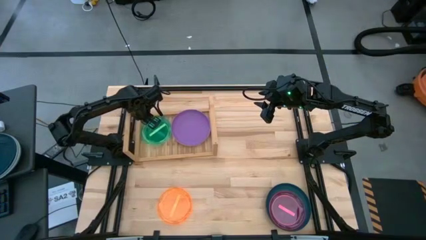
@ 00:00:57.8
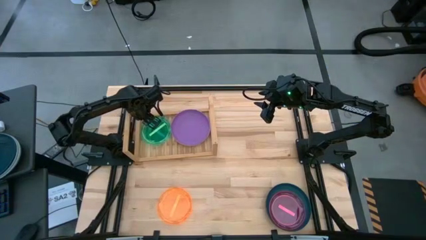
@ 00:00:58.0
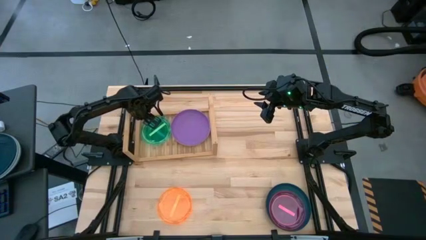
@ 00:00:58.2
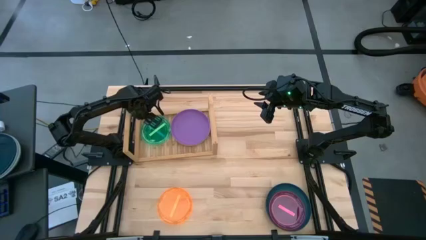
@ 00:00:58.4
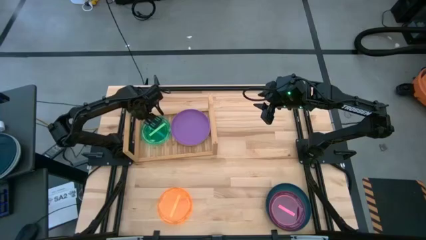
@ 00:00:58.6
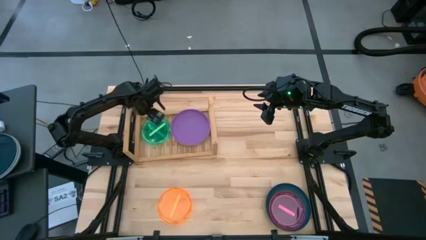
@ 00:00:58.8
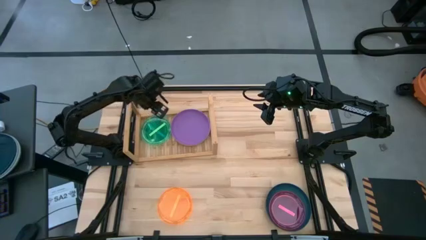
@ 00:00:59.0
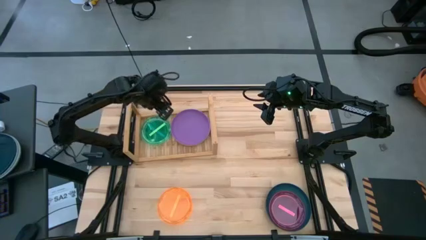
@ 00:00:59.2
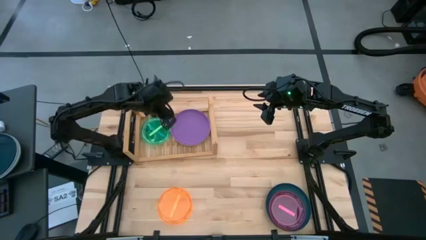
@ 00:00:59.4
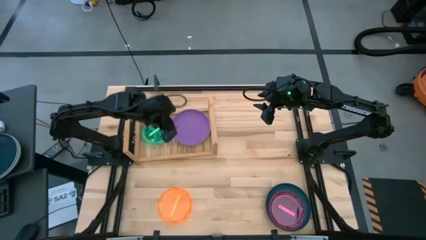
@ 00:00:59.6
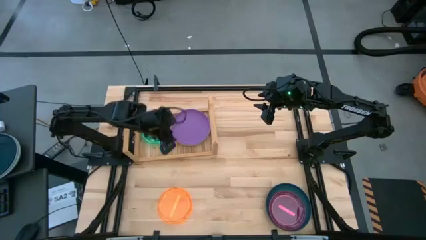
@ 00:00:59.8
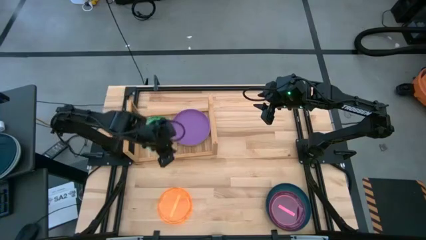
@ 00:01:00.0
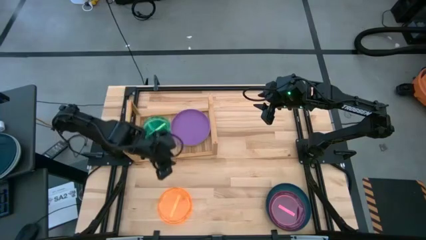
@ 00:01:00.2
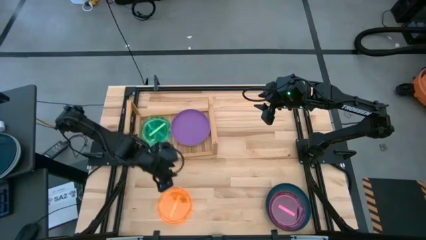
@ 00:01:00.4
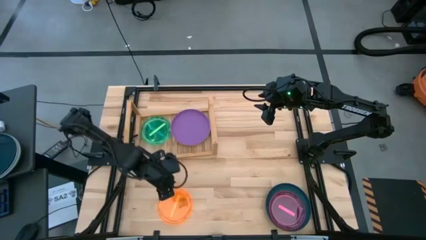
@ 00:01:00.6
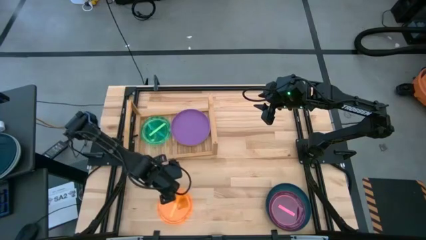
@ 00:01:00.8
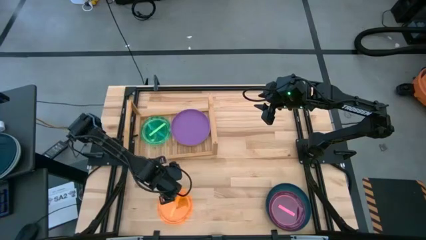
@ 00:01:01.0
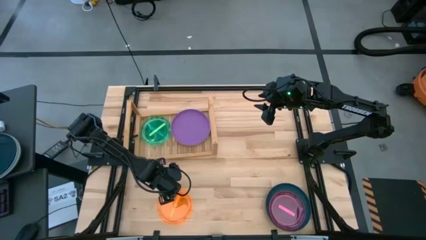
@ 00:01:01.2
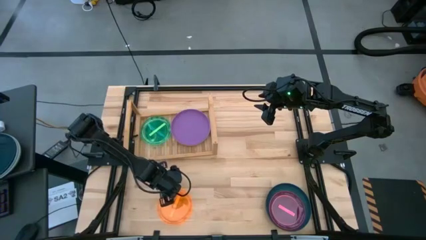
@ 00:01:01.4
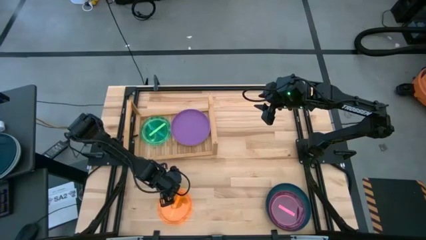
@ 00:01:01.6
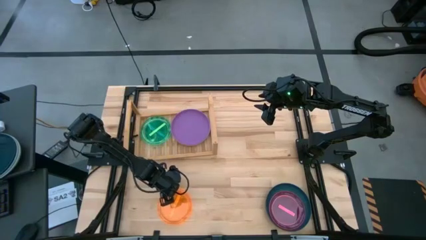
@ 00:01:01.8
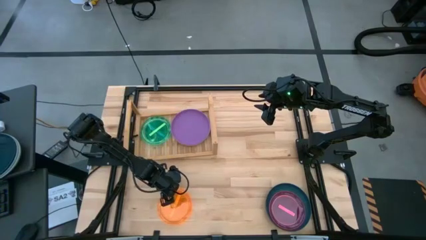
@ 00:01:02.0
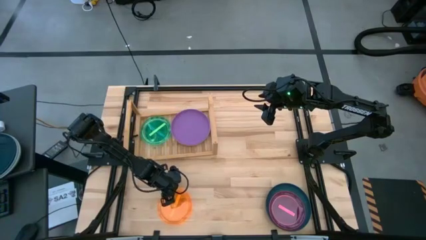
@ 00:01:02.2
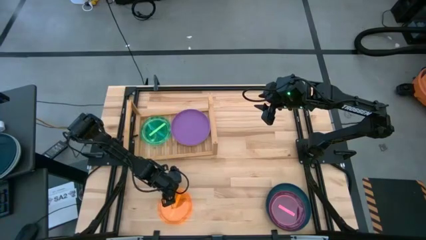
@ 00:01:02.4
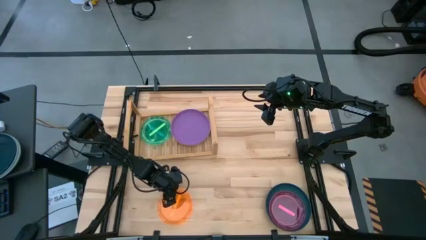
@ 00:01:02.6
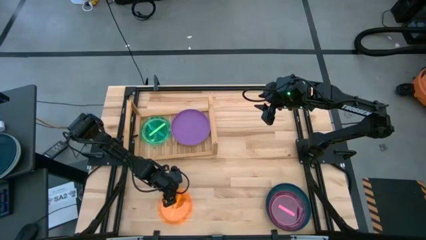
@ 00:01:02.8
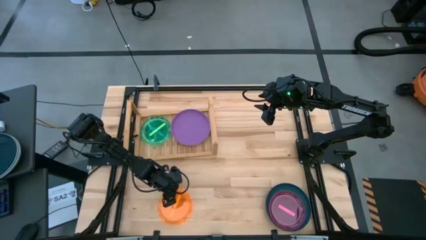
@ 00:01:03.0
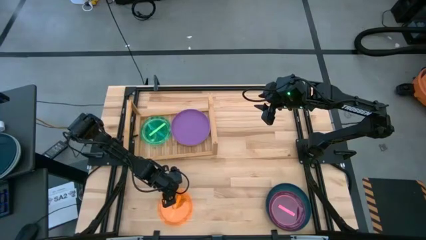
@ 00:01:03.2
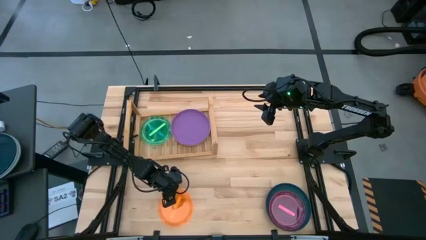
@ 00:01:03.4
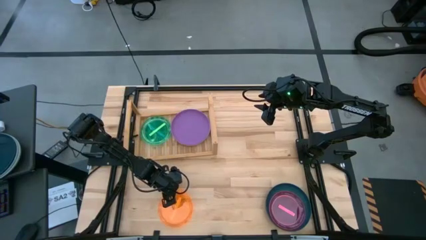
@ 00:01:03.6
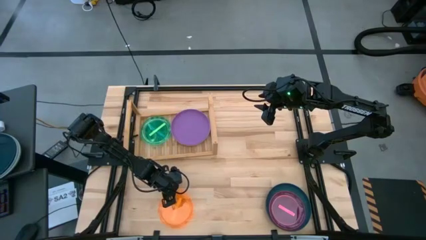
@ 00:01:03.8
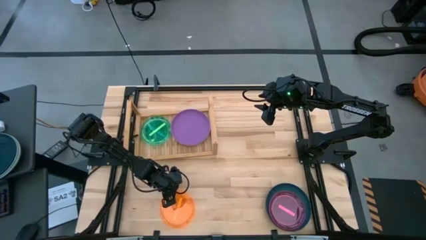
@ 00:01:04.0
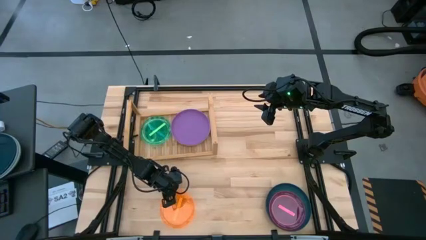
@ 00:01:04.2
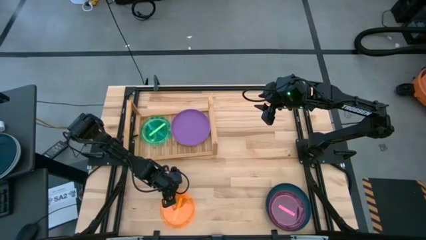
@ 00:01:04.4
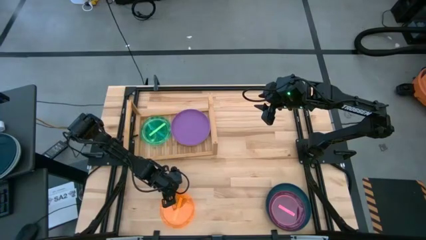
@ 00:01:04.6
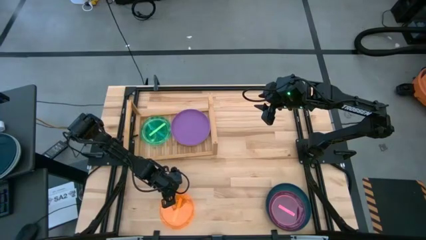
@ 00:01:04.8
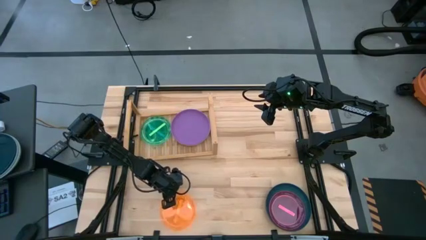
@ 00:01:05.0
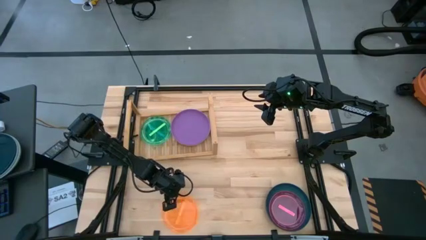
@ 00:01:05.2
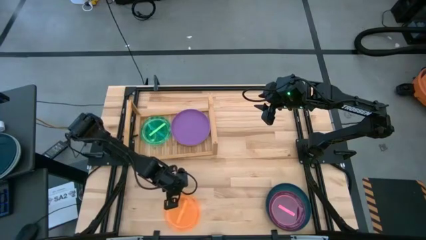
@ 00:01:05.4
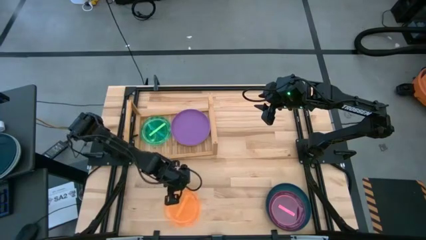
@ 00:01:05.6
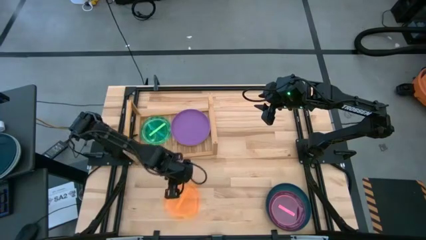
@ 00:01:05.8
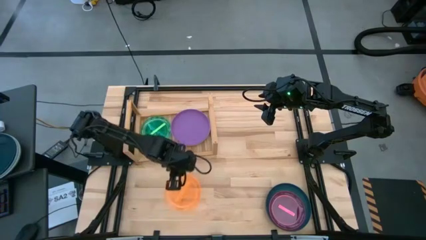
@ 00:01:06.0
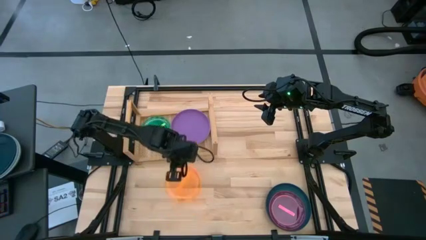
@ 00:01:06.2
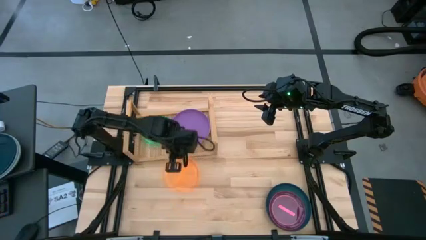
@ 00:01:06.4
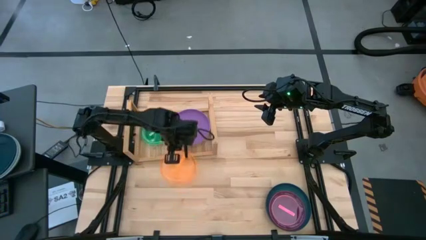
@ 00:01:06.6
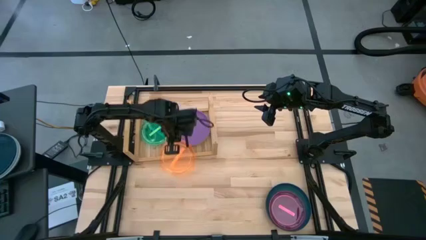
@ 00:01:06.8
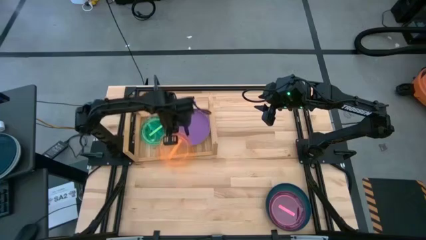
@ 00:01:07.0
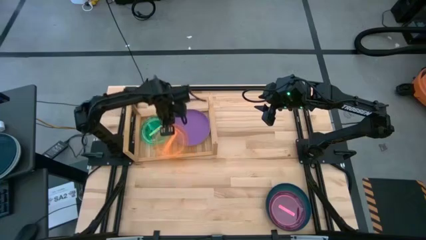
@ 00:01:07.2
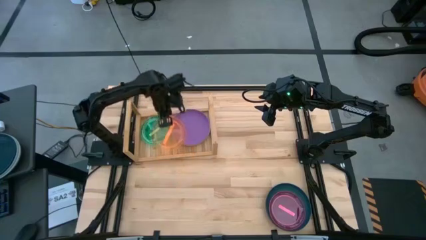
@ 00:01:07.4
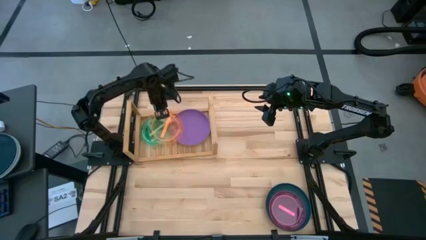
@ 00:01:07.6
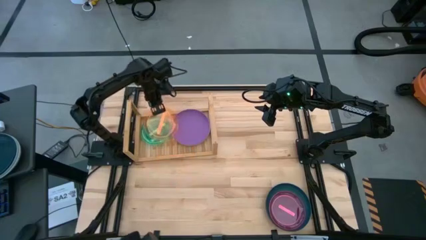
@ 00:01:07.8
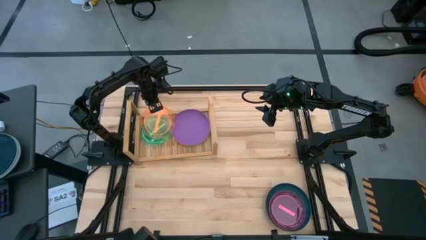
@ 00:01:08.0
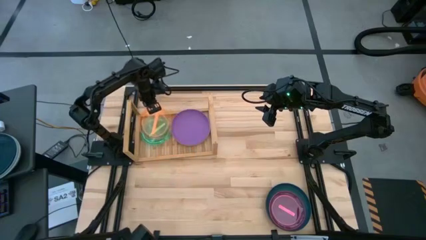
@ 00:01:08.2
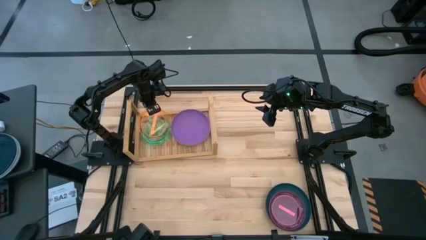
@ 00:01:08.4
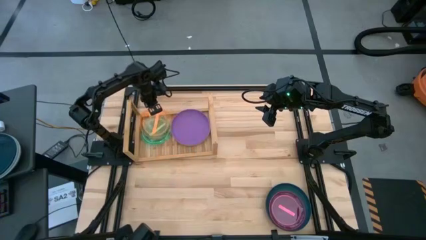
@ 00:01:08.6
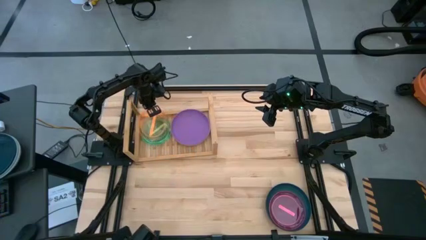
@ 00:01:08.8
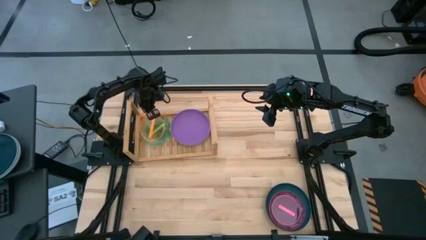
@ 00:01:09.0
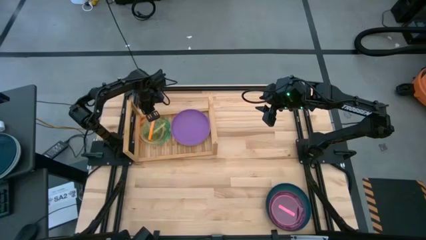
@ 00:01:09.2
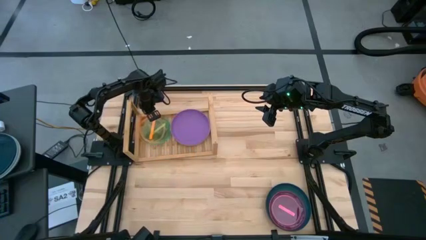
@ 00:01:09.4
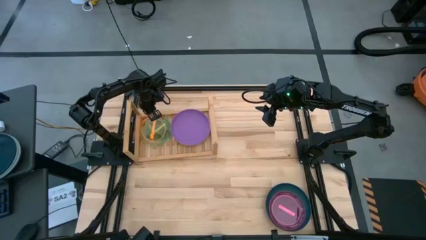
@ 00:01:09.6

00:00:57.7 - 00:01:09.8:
Task: Place and stack plates onto a shelf
Stack the orange plate on top of the green plate on the shelf
